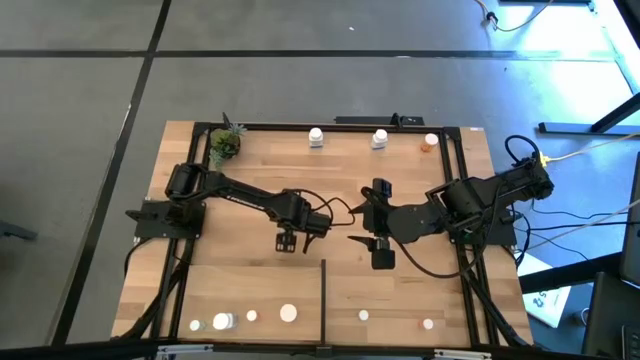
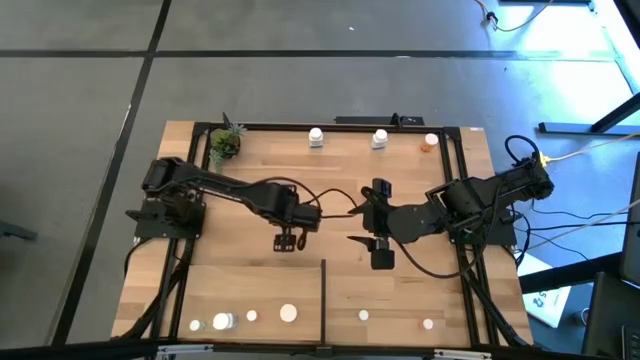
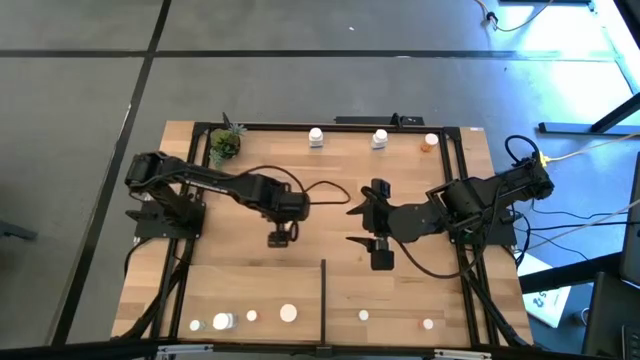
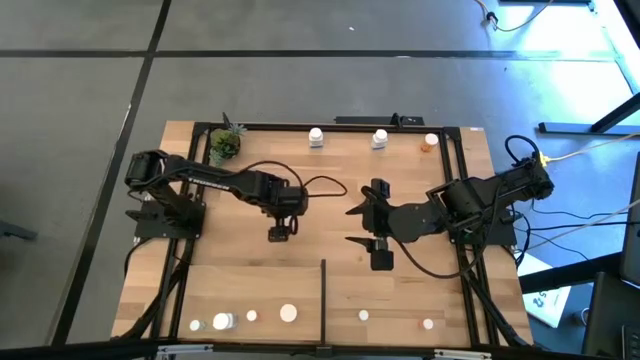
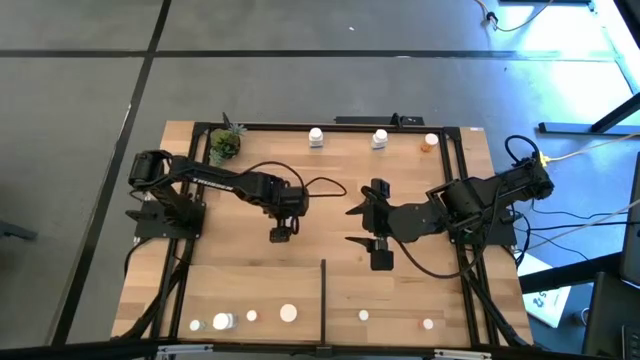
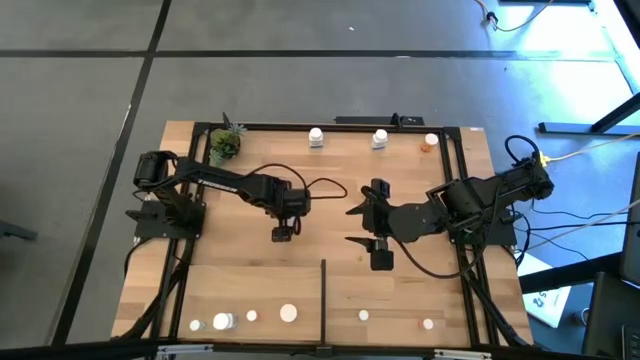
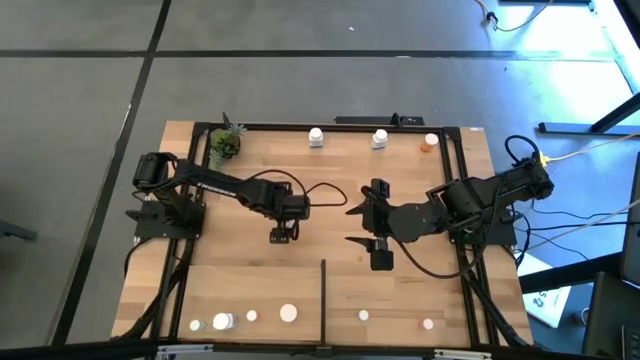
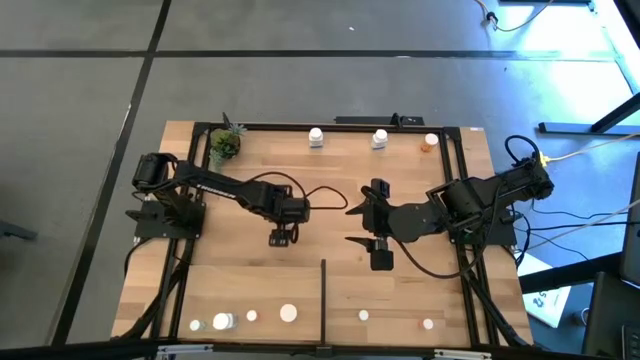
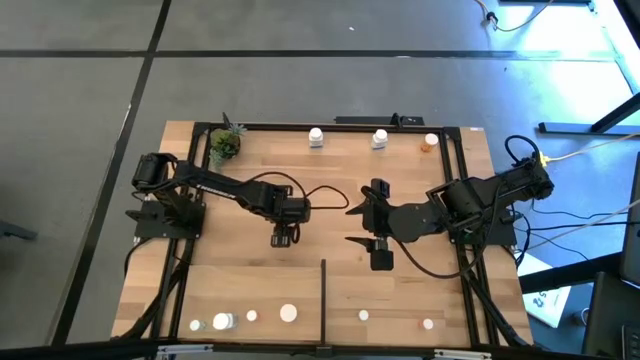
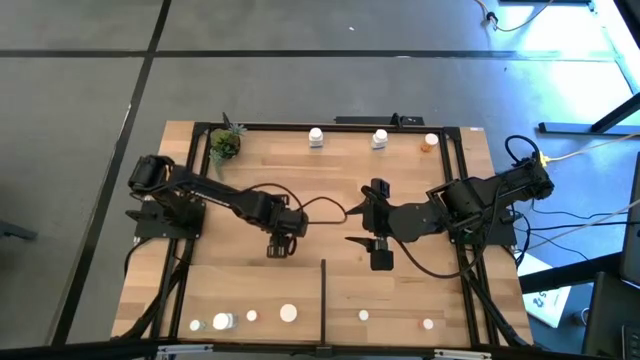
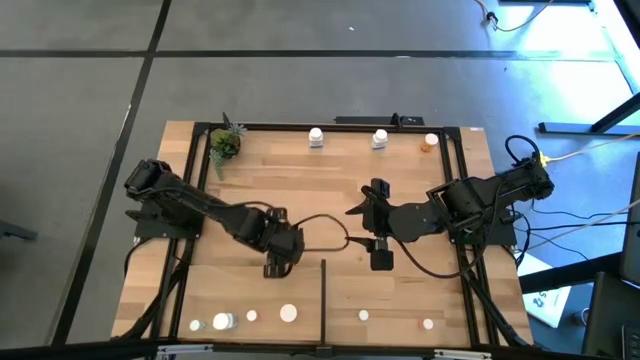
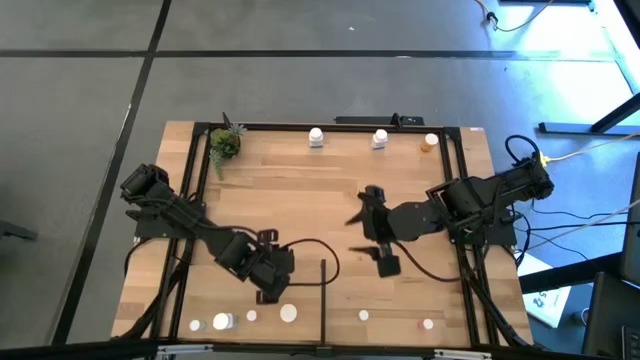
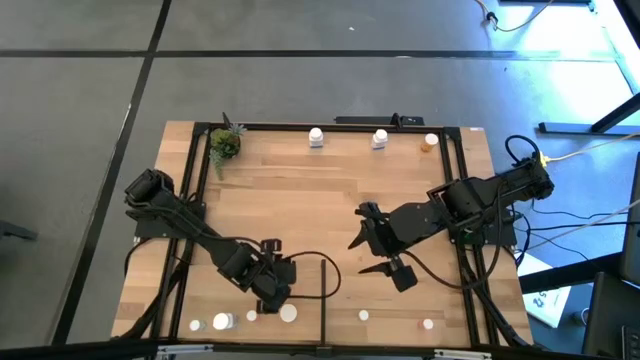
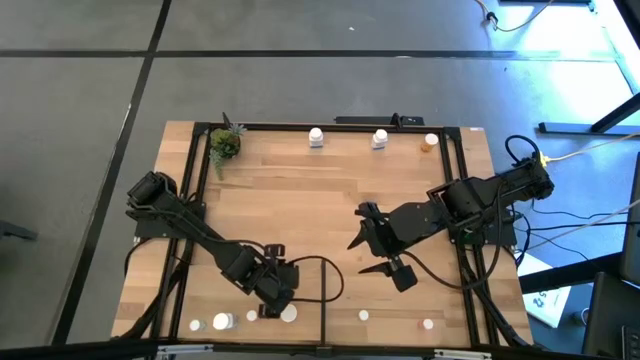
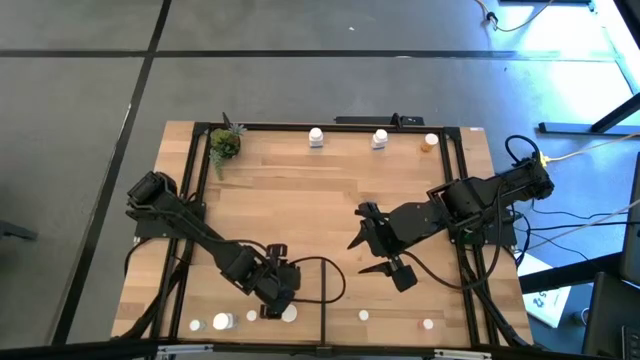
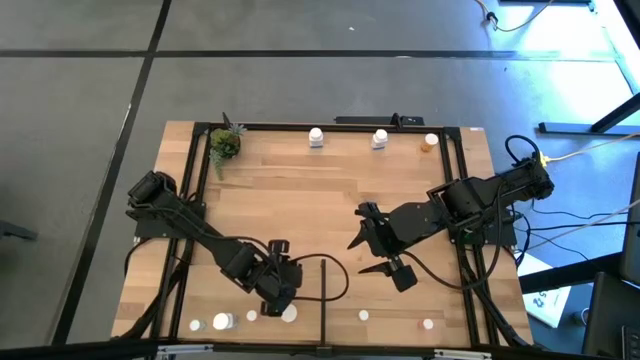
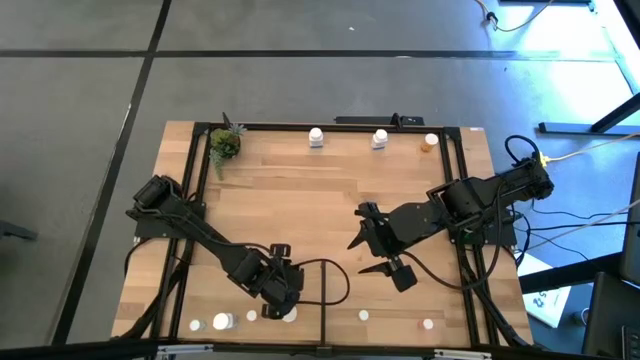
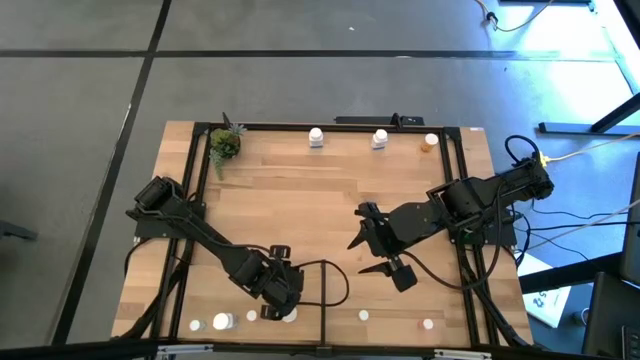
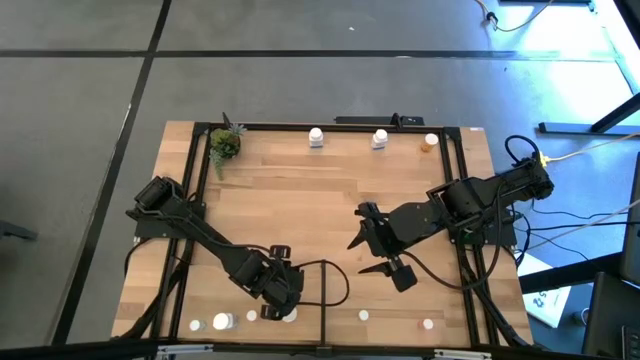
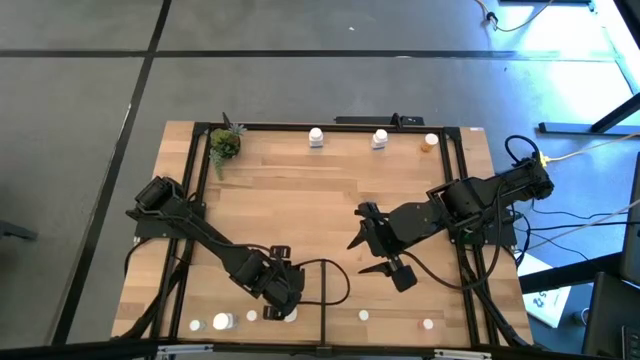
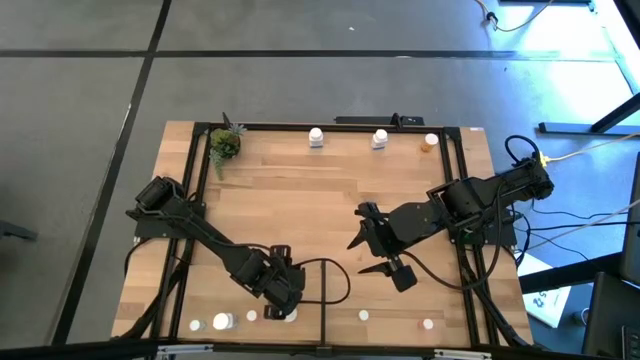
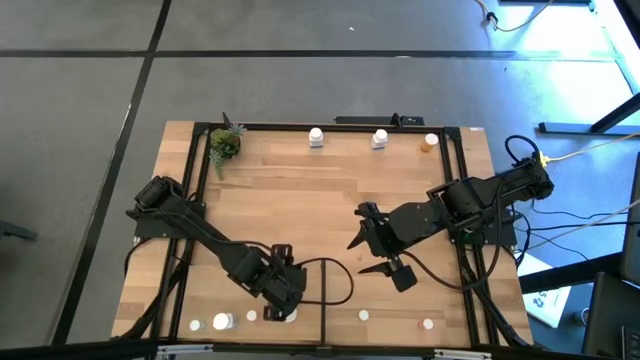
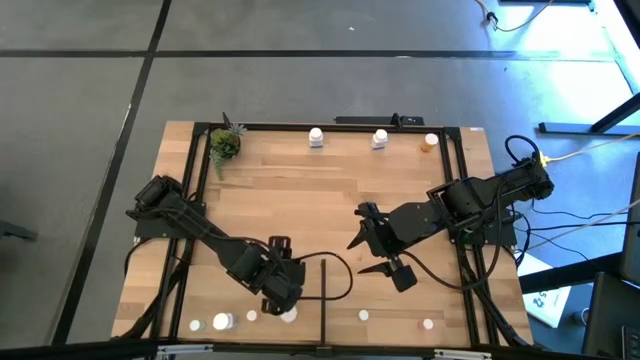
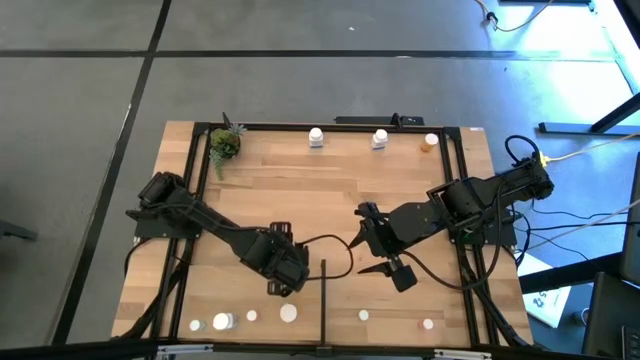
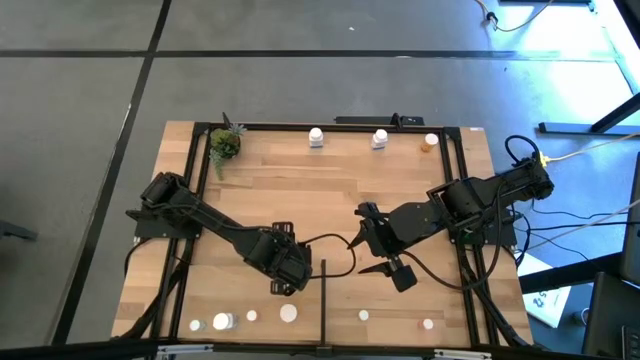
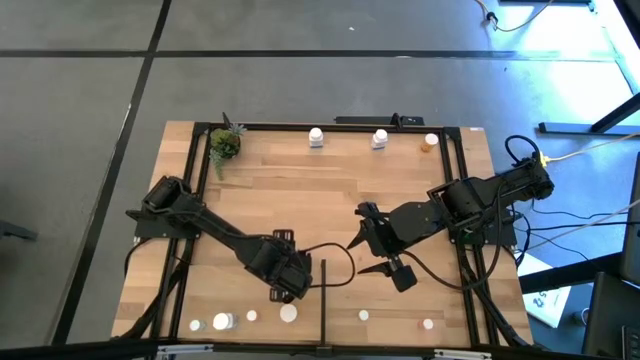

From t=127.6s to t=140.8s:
Task: Pick and place medicine bottles onto shelf by color
Put the bottom orange pill bottle on the shelf aligned with the other orange pill bottle

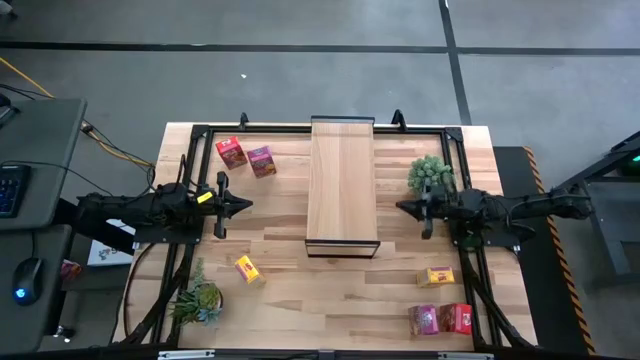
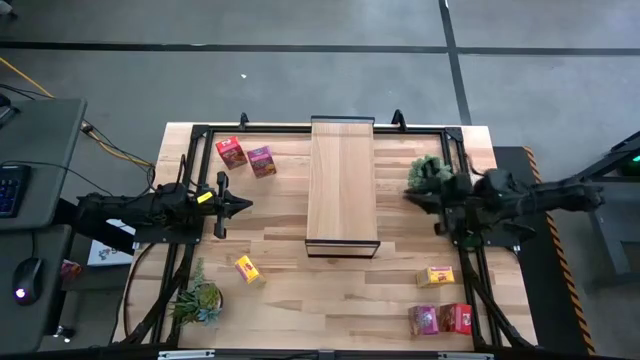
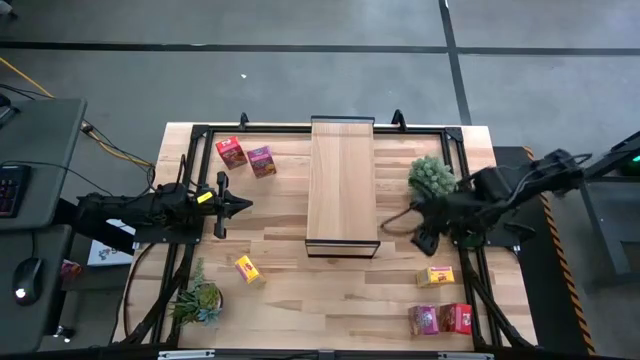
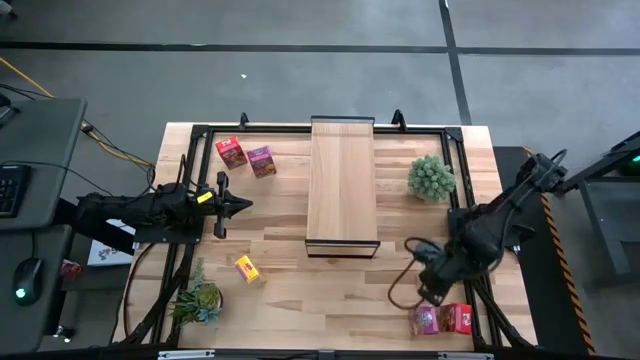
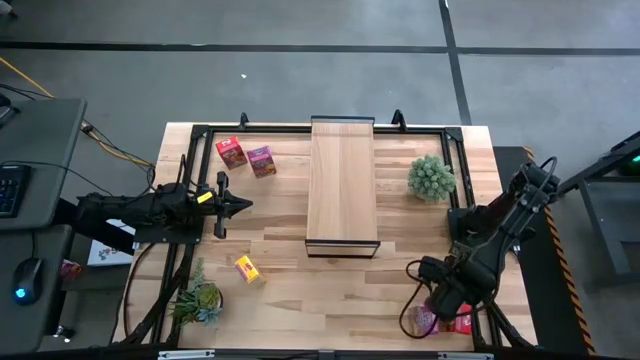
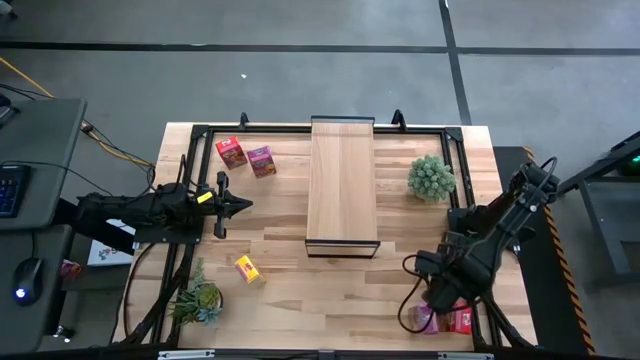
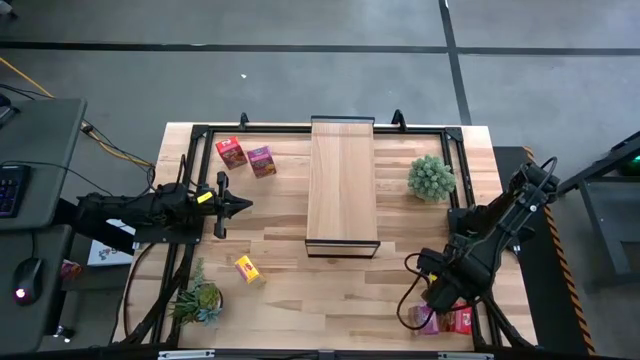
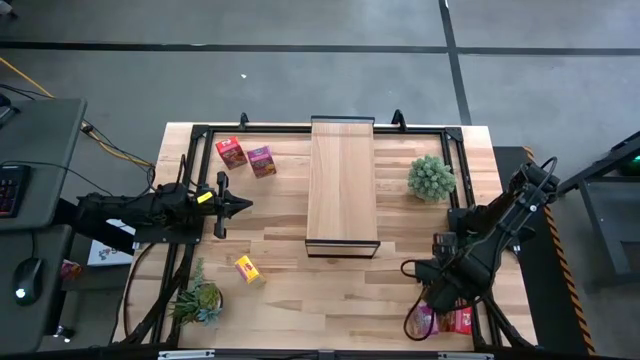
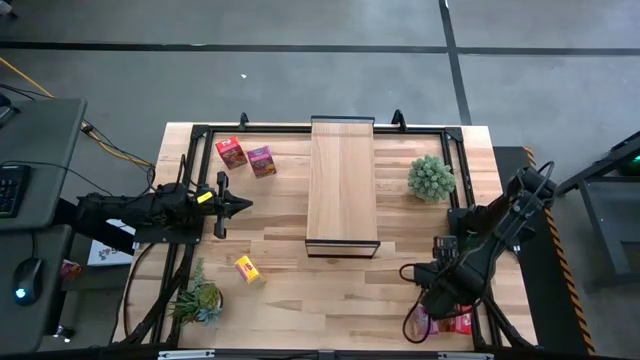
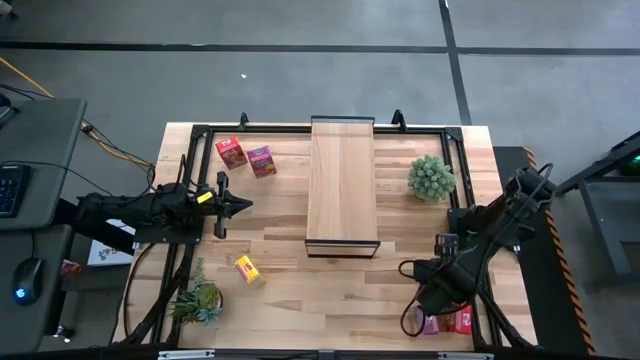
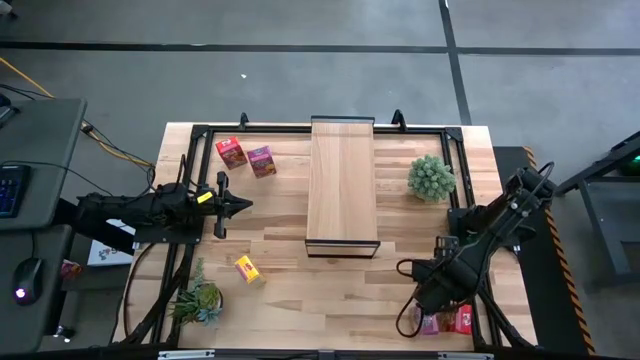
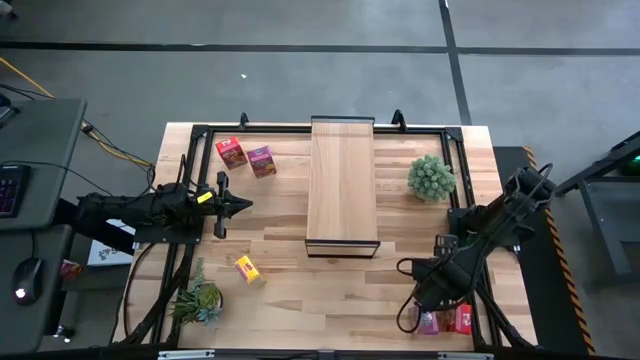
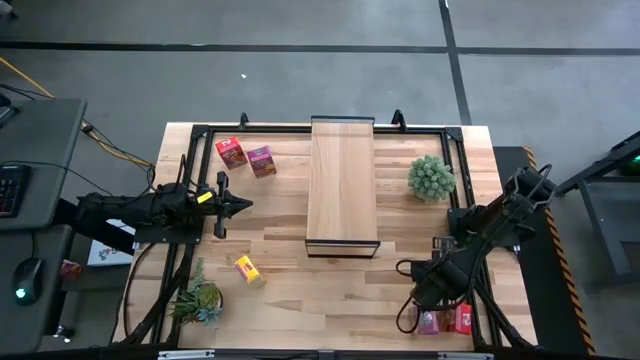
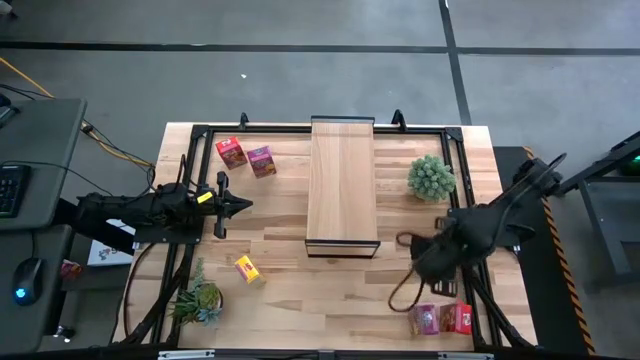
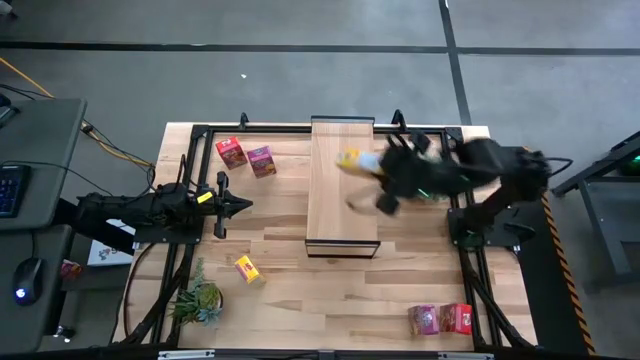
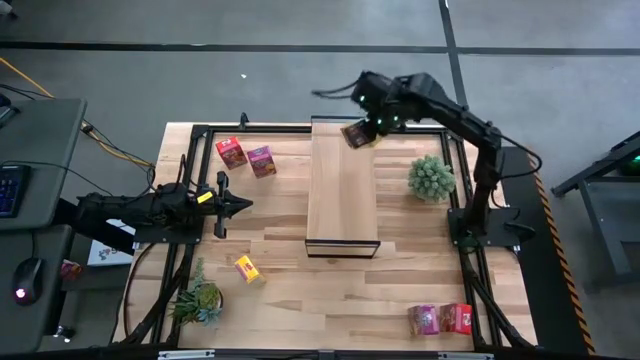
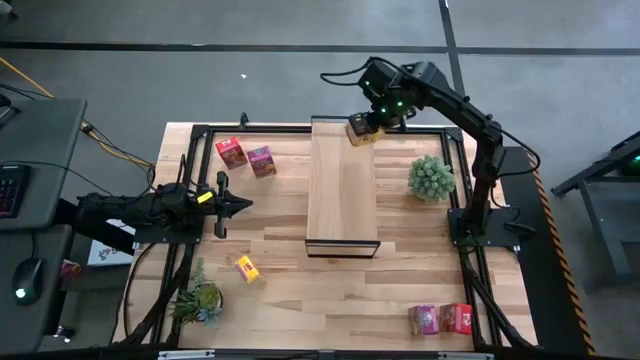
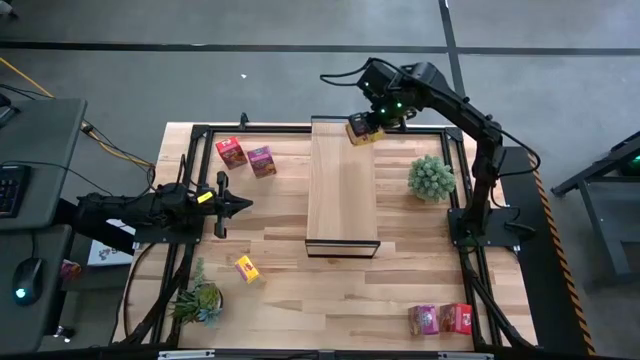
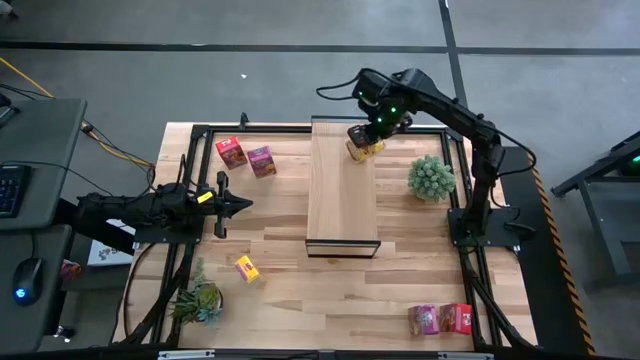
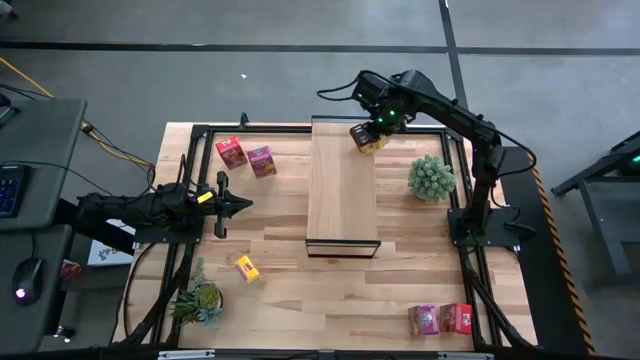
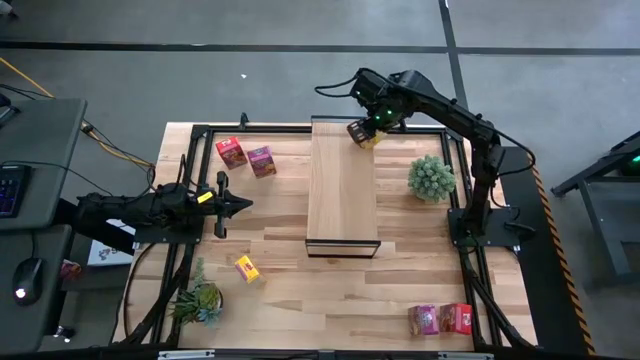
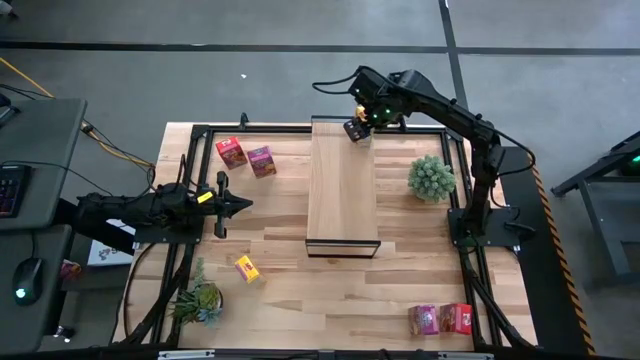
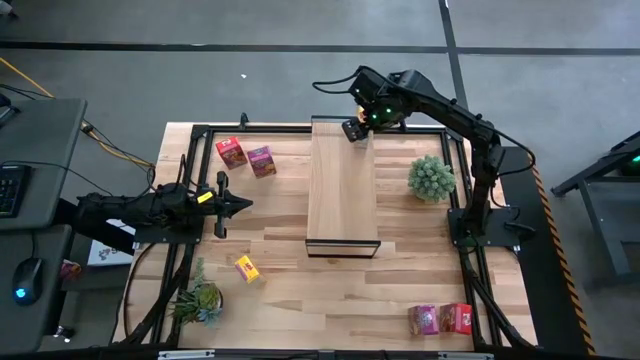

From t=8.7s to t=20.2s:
Task: Stack cereal on shelf
Put the right yellow cereal box on the shelf
